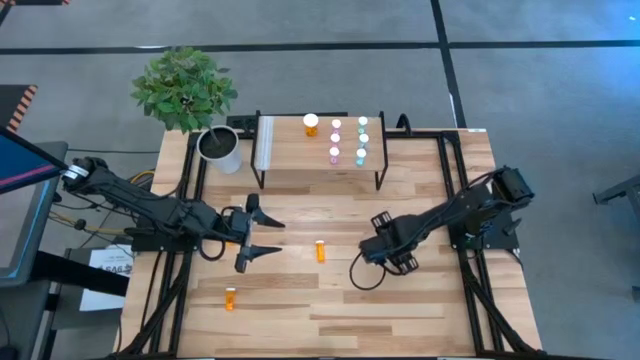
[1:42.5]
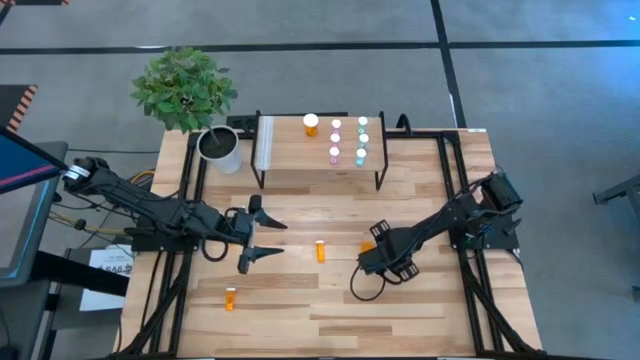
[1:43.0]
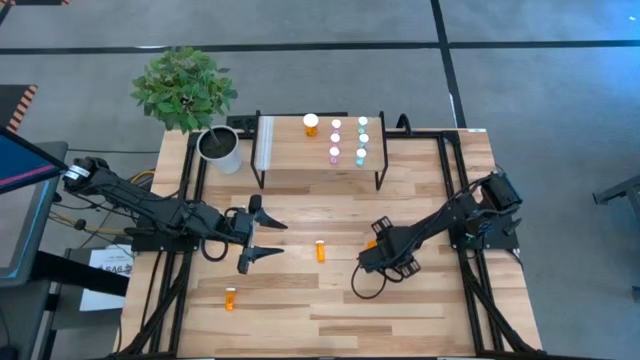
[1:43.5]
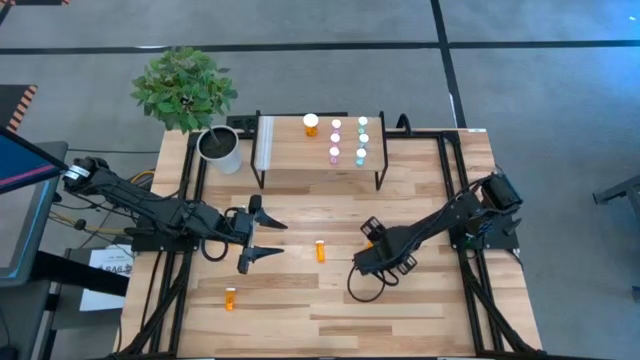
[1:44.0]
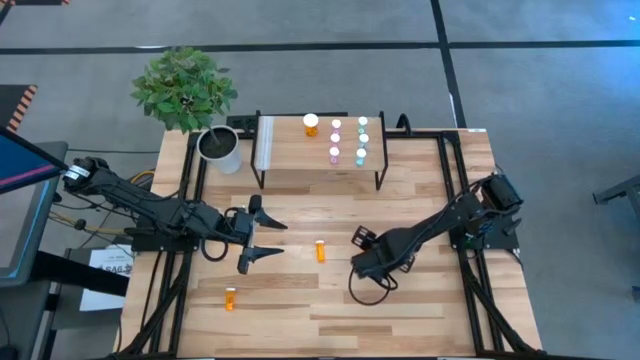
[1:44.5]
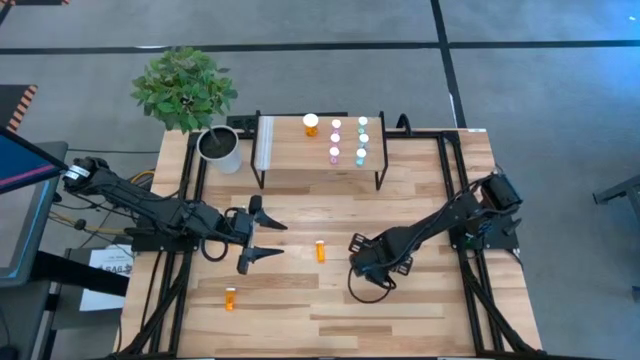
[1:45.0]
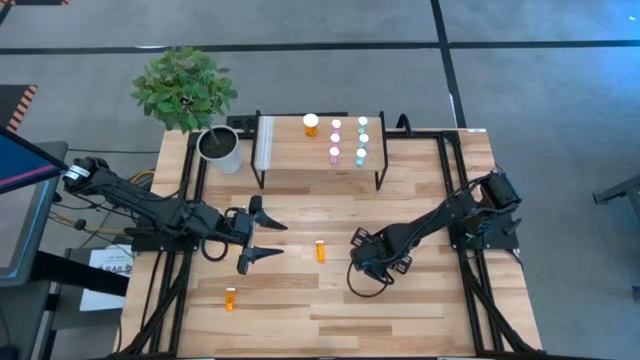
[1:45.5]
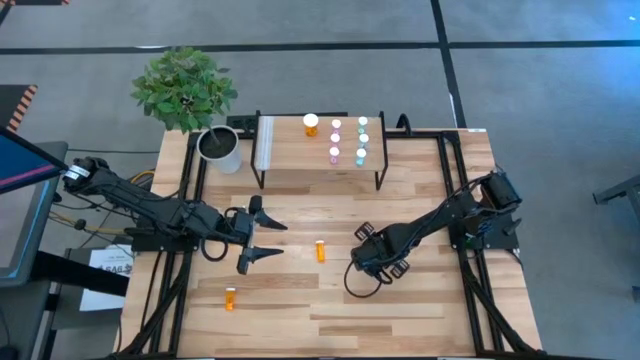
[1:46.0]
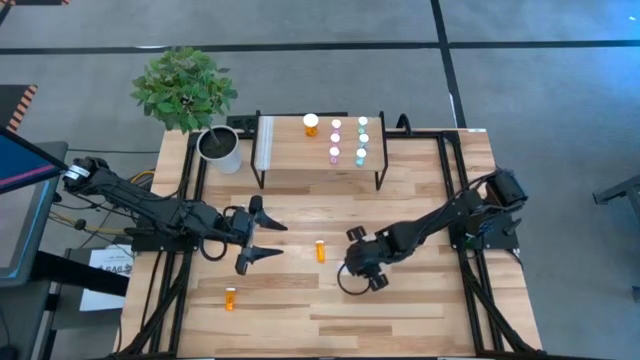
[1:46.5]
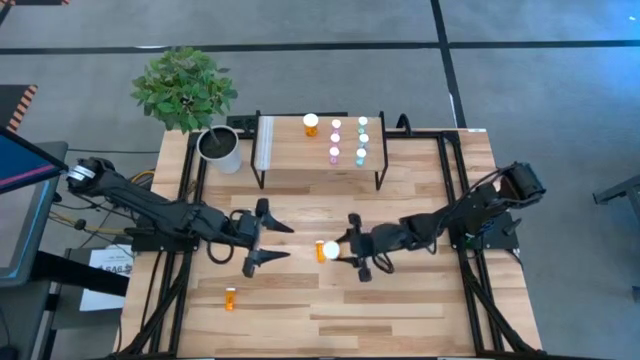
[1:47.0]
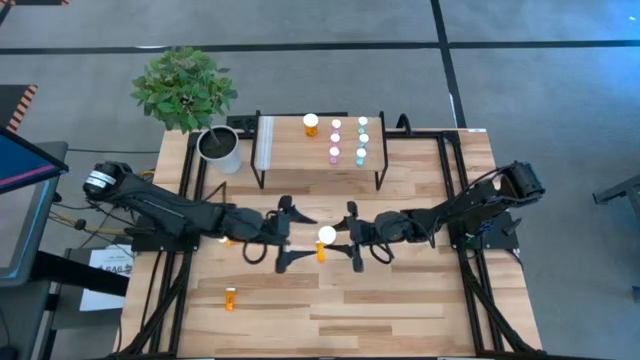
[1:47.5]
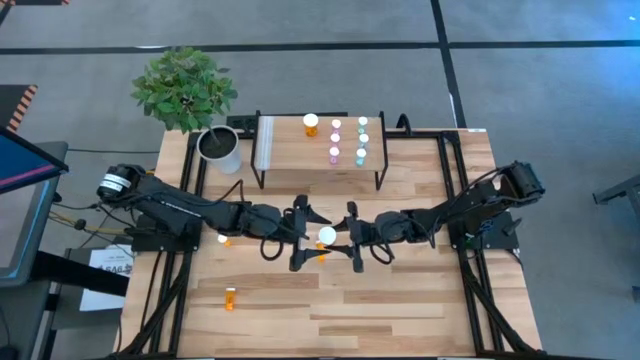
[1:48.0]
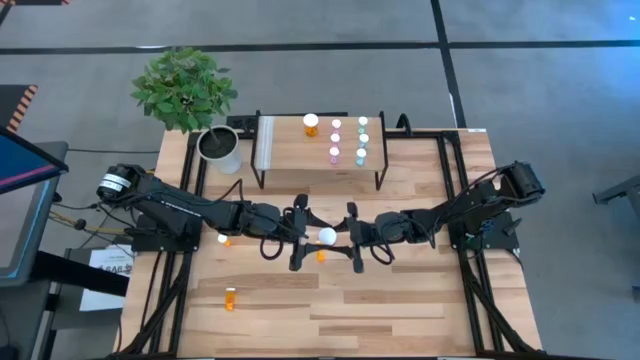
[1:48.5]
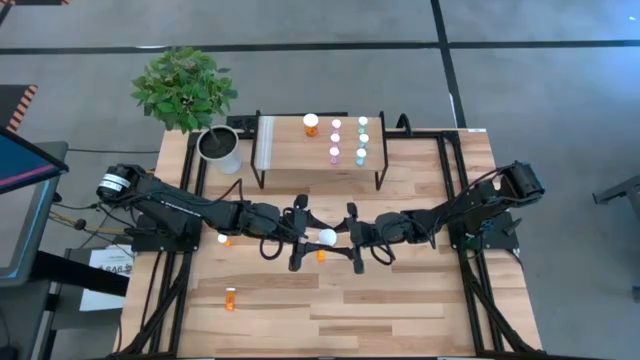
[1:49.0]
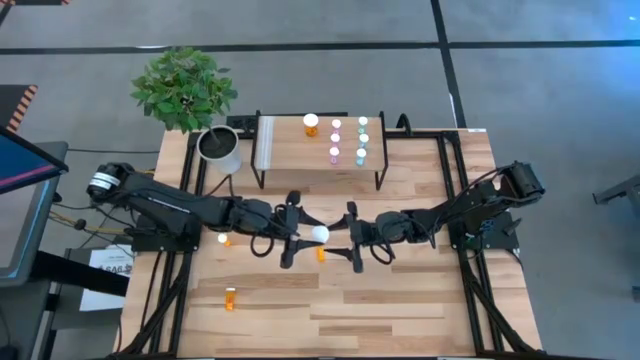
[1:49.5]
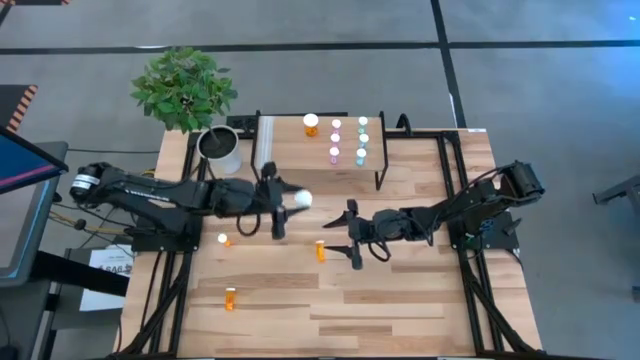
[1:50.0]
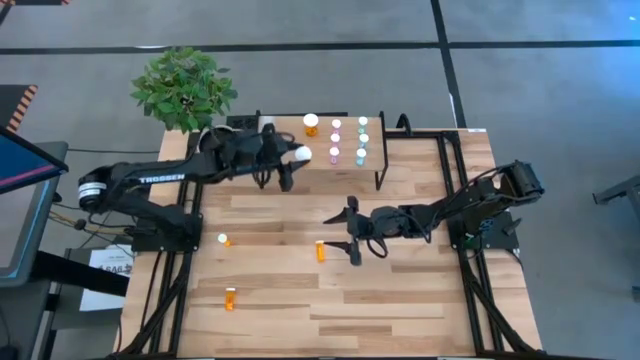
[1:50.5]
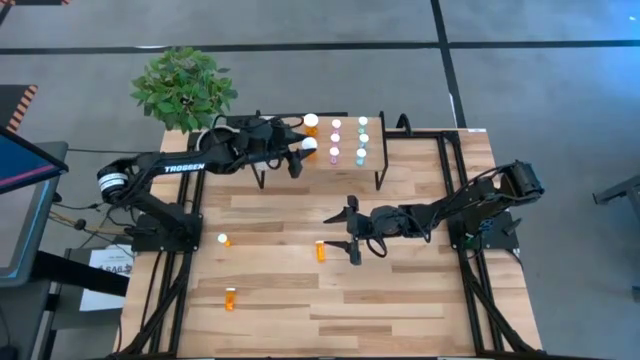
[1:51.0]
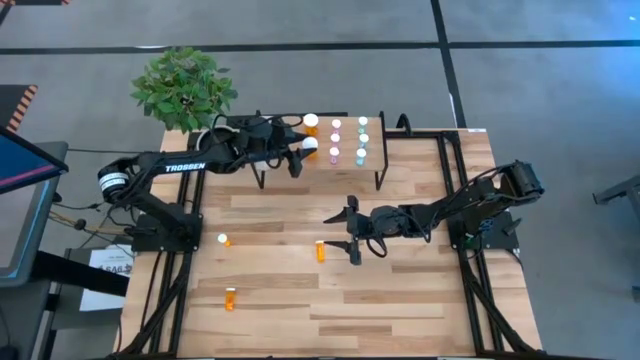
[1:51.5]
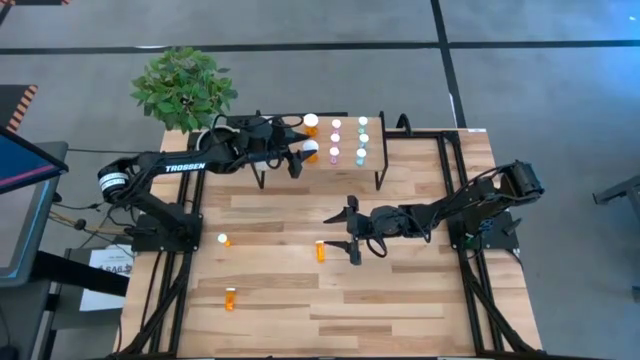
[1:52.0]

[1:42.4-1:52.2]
Task: Pick and place medicine bottles onto shelf by color
Put the large orange pill bottle on the shelf aligned with the other large orange pill bottle

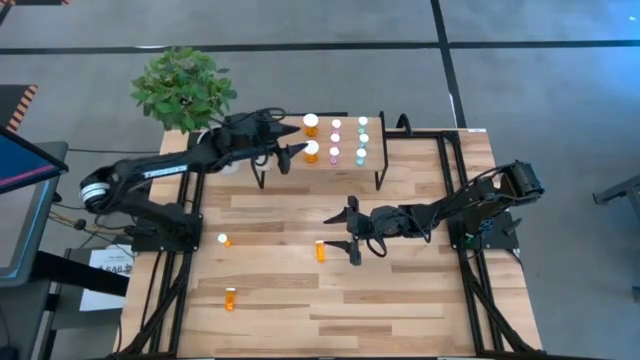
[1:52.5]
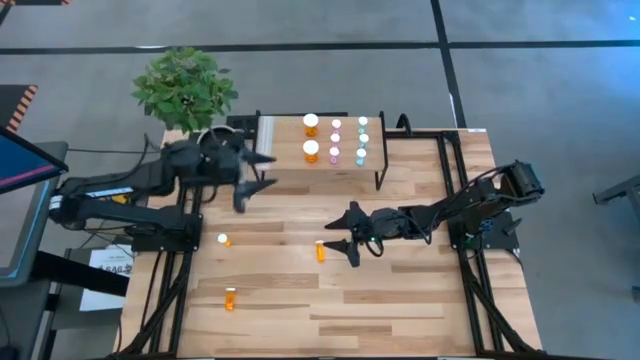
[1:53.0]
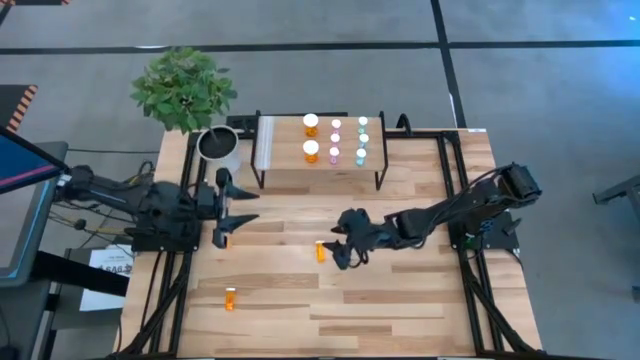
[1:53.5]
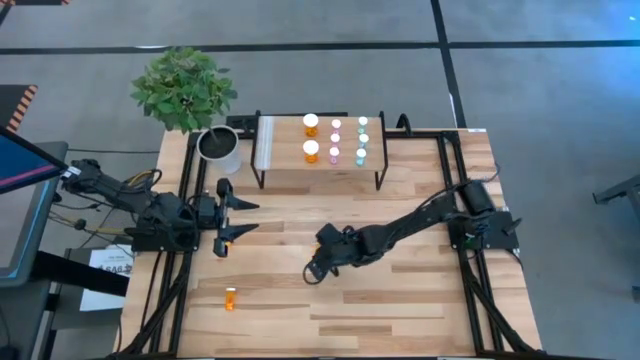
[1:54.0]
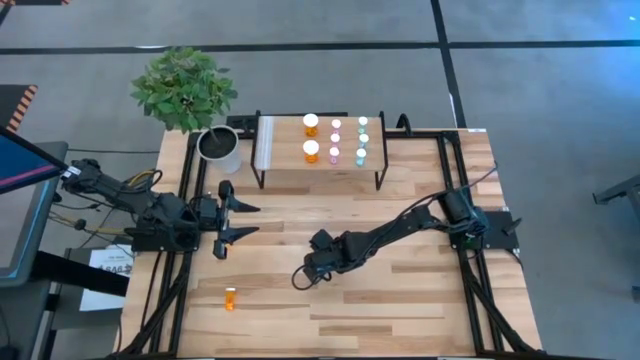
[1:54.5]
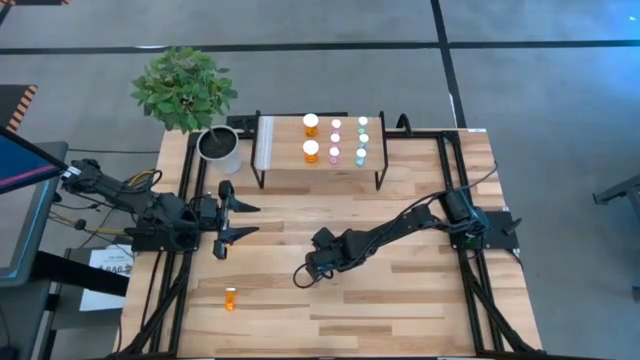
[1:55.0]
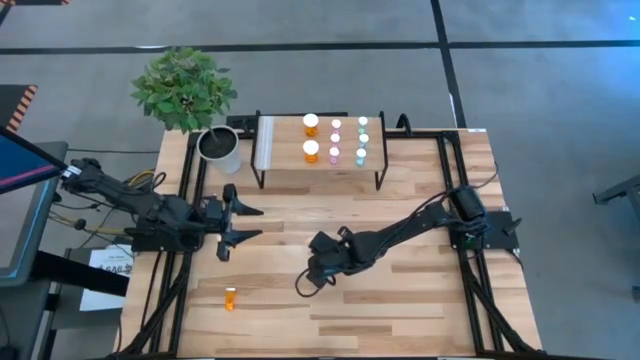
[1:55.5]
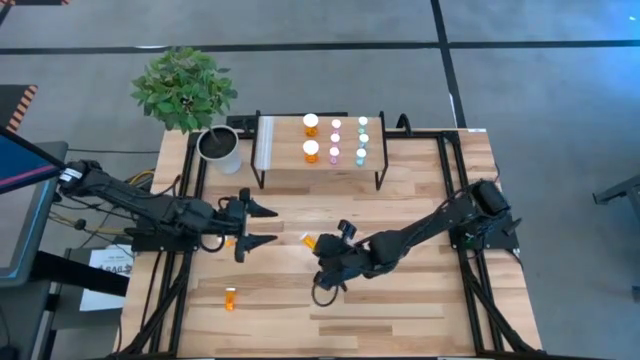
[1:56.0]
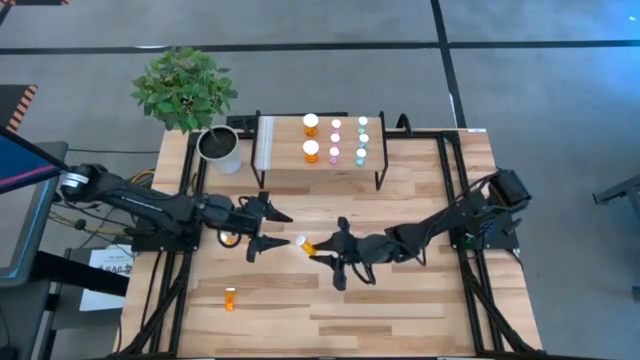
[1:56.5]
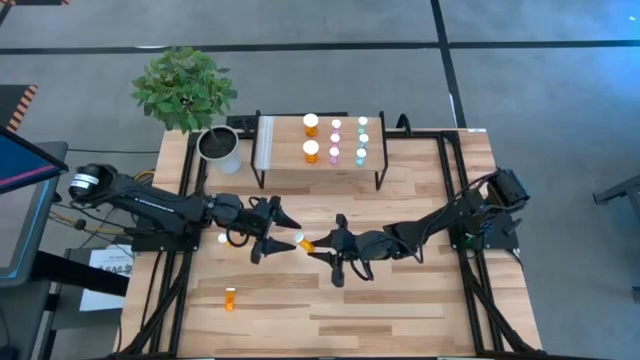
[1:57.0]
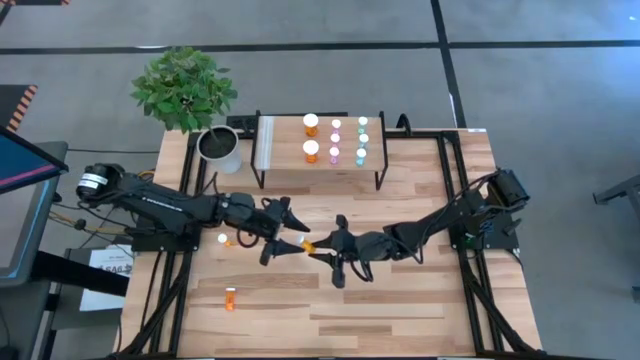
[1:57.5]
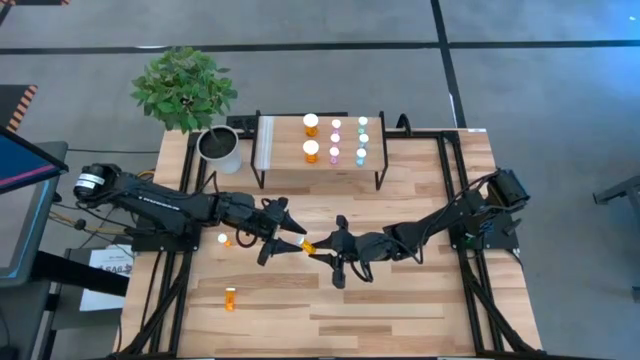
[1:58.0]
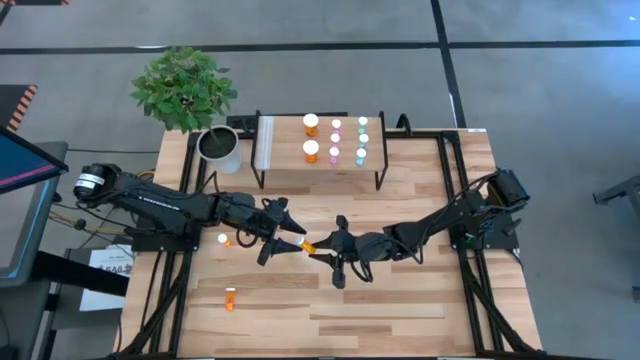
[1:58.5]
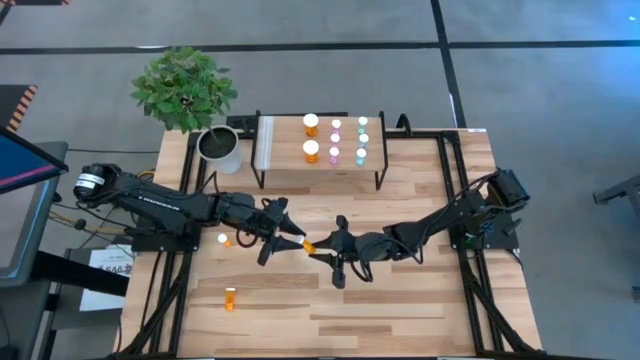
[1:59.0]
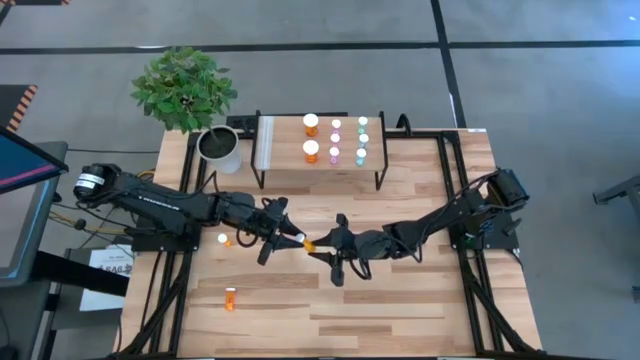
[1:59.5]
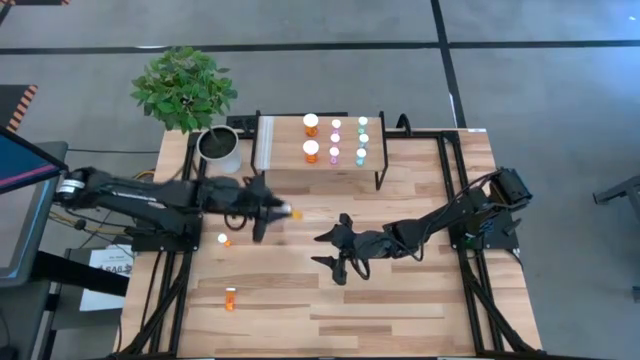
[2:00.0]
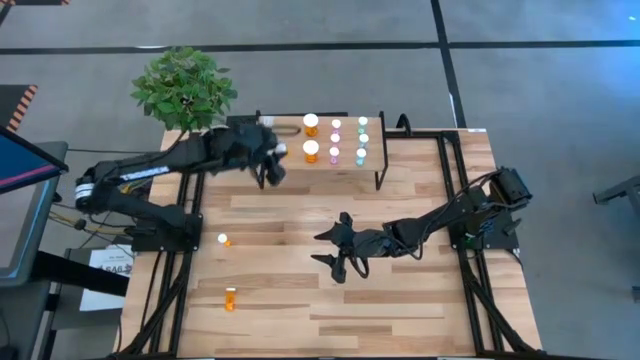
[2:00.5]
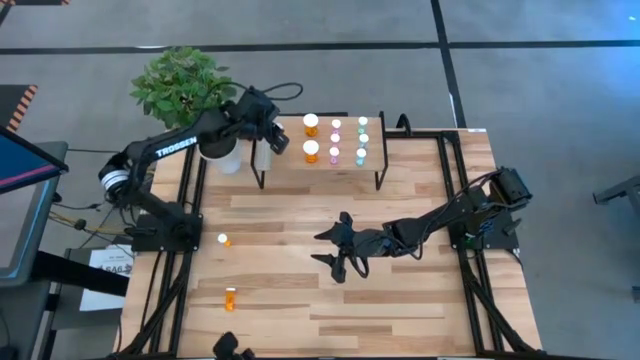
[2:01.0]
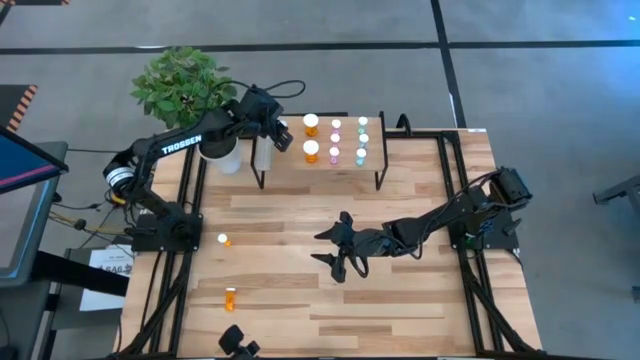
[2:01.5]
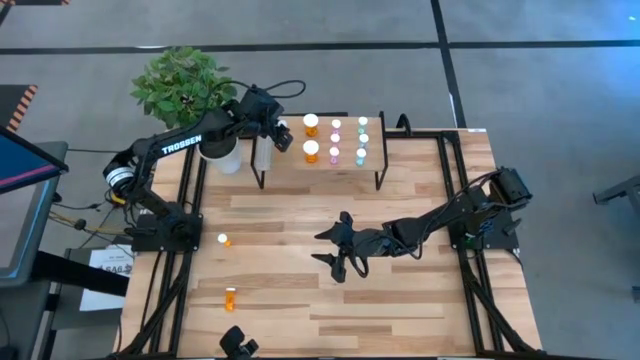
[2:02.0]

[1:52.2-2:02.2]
Put the right small orange pill bottle on the shelf

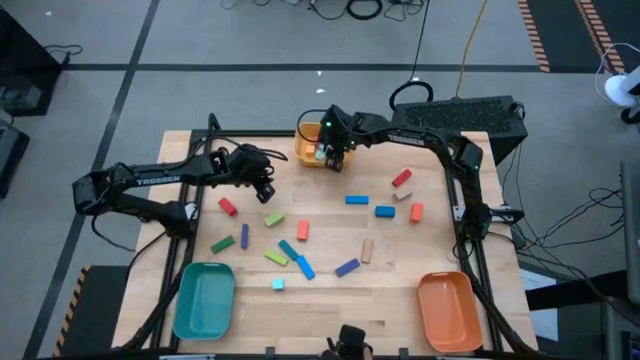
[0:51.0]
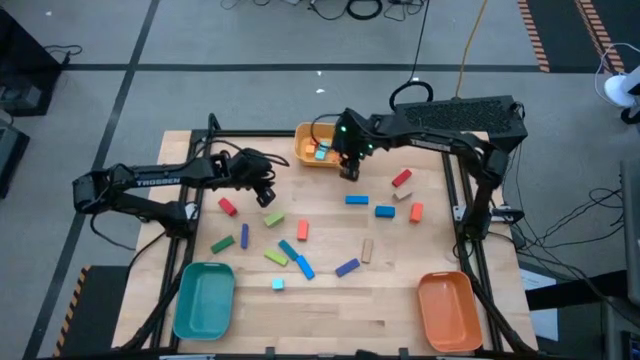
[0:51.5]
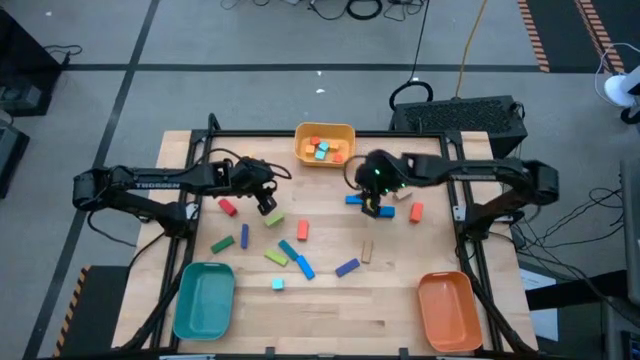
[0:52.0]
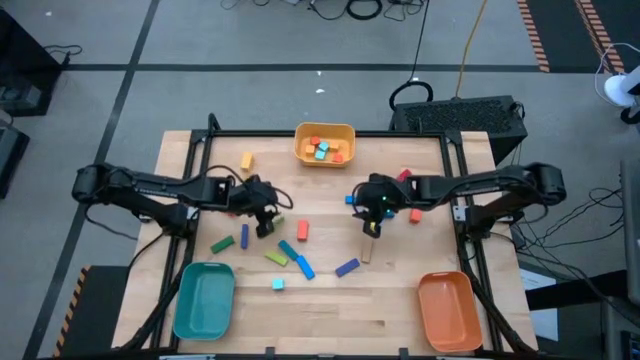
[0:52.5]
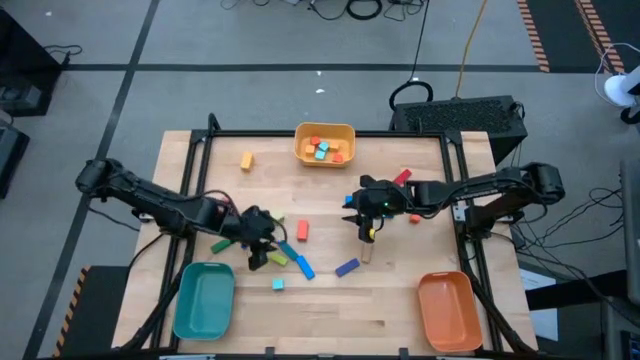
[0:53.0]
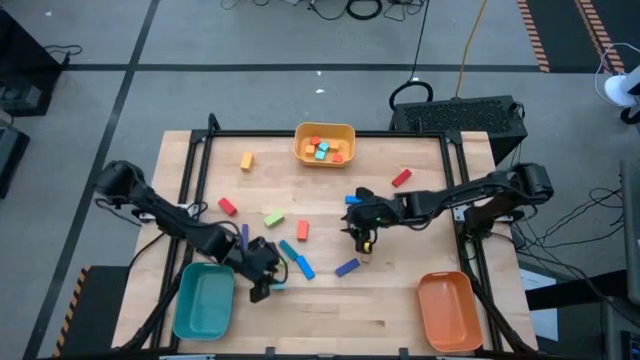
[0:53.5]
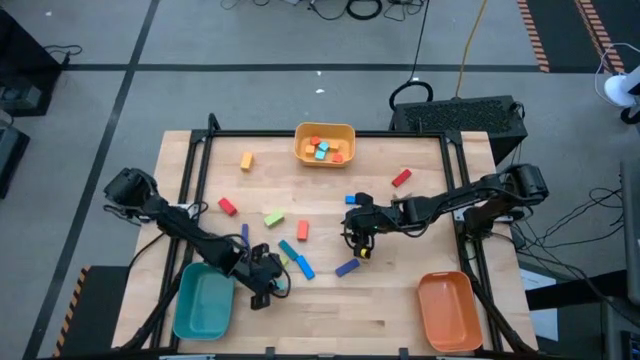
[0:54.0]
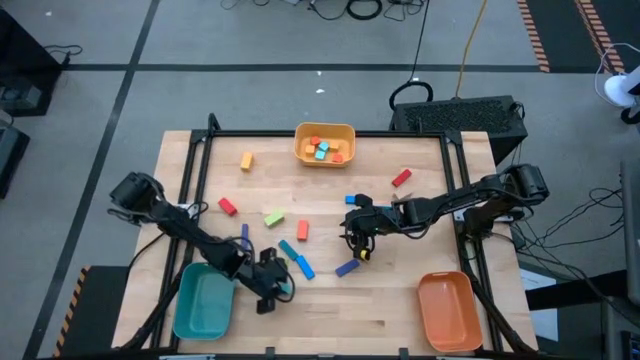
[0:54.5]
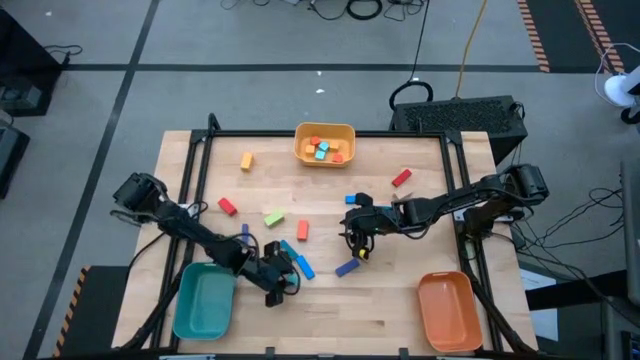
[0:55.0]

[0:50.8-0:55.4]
Task: Sort blocks by size
Put the blue square block into the yellow bin
